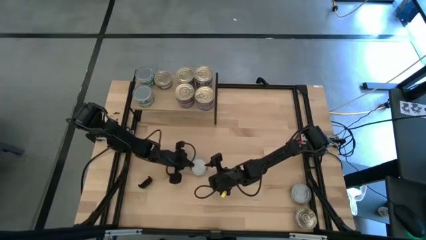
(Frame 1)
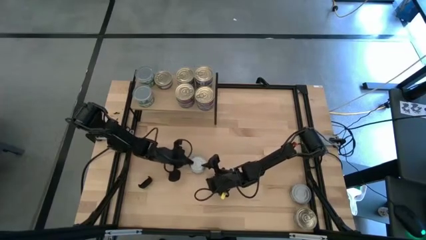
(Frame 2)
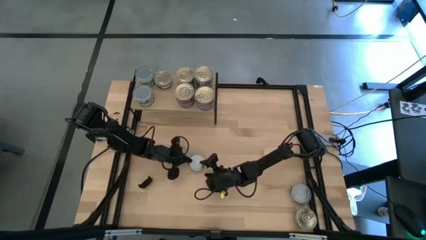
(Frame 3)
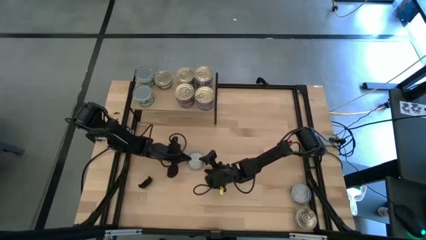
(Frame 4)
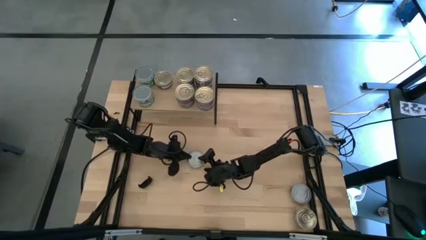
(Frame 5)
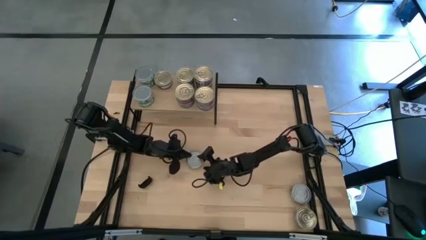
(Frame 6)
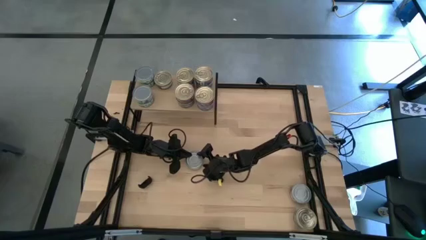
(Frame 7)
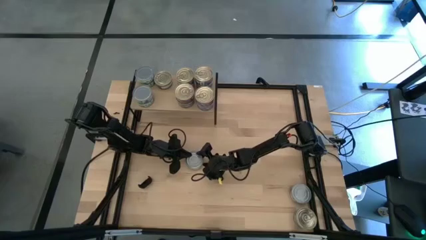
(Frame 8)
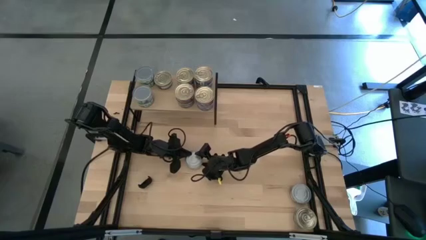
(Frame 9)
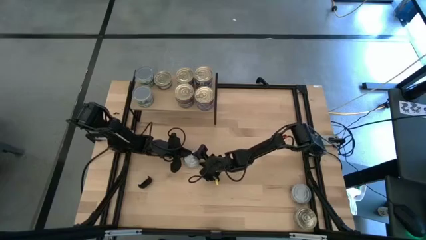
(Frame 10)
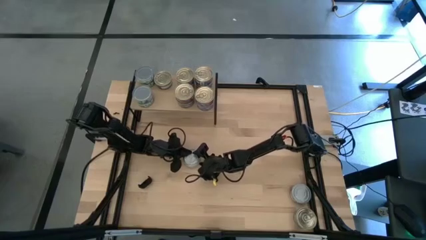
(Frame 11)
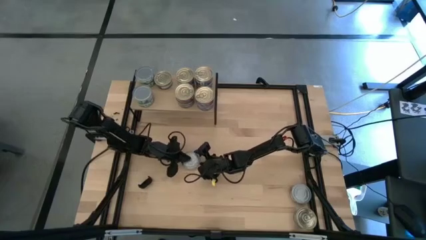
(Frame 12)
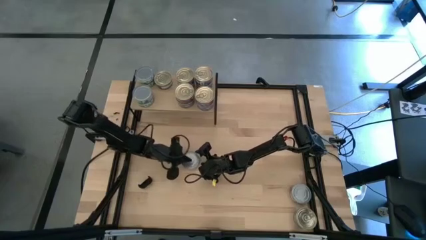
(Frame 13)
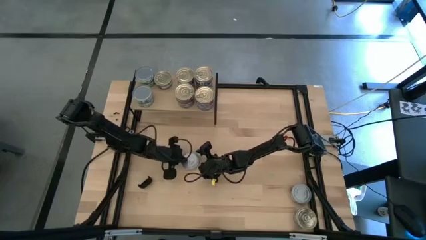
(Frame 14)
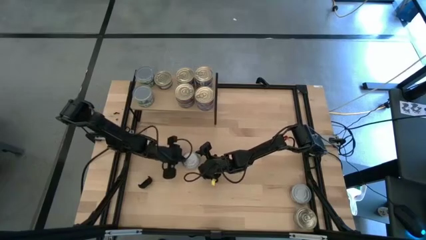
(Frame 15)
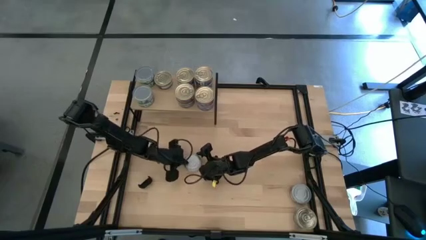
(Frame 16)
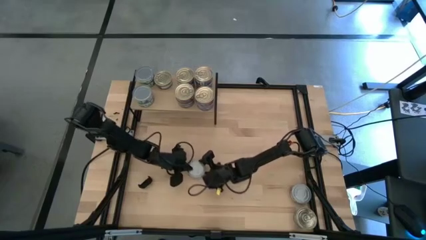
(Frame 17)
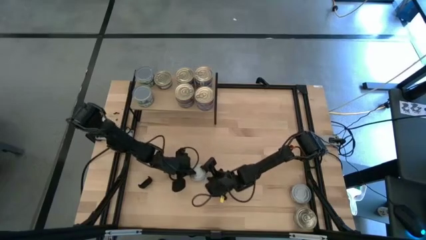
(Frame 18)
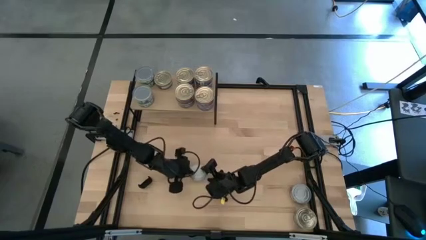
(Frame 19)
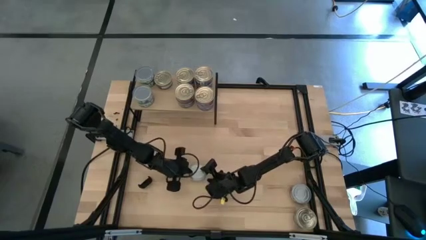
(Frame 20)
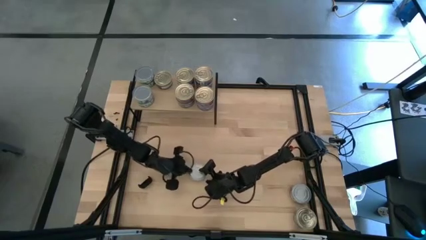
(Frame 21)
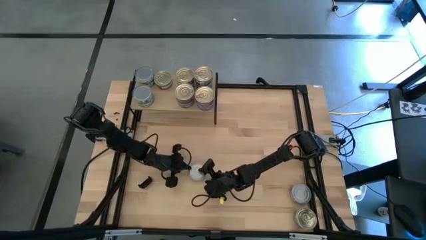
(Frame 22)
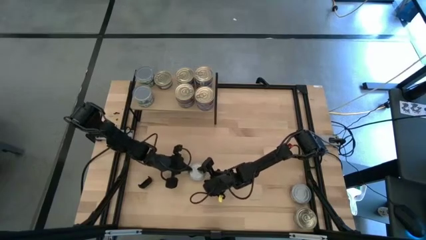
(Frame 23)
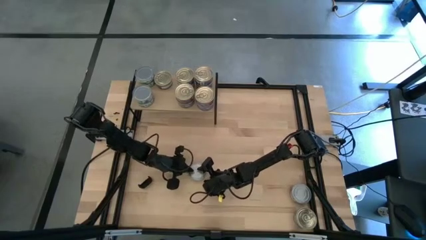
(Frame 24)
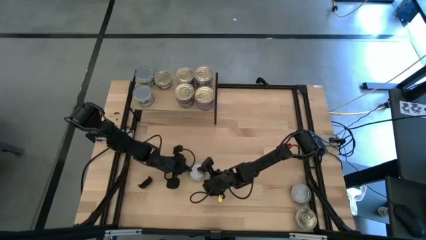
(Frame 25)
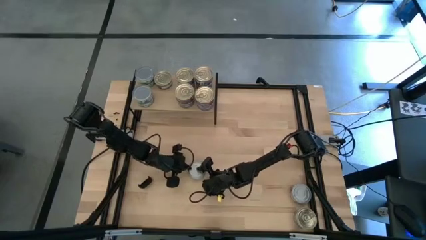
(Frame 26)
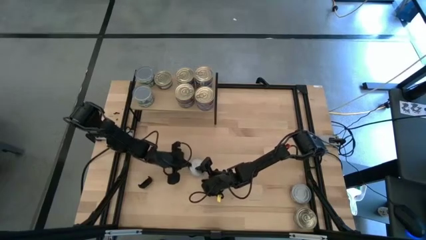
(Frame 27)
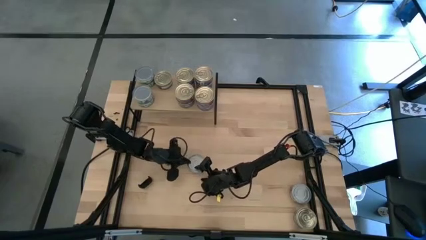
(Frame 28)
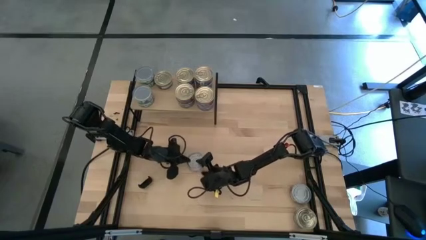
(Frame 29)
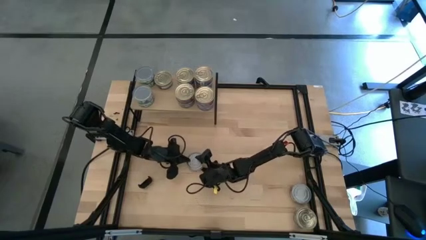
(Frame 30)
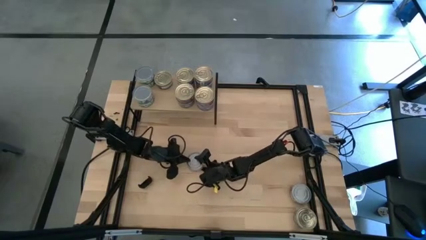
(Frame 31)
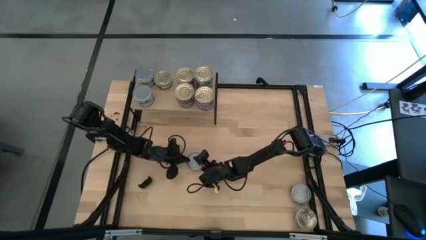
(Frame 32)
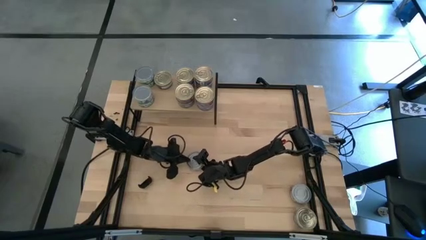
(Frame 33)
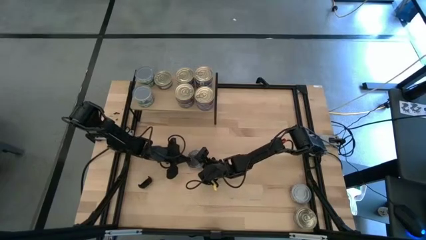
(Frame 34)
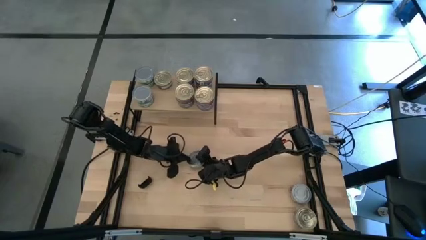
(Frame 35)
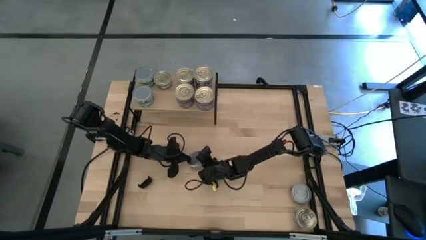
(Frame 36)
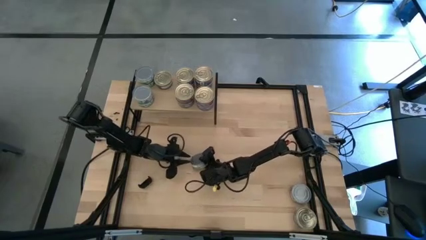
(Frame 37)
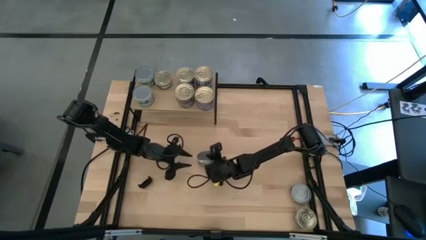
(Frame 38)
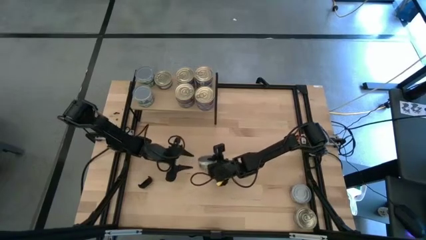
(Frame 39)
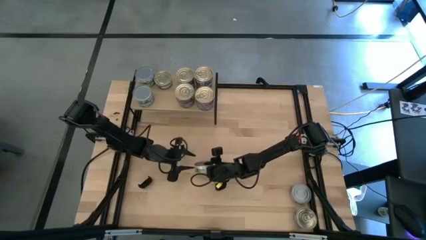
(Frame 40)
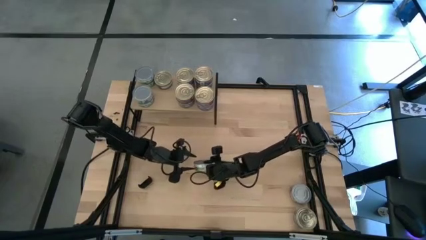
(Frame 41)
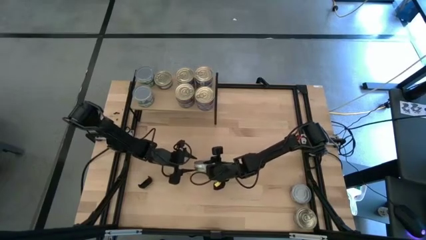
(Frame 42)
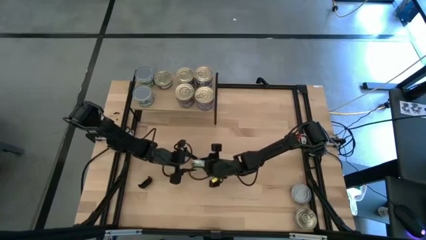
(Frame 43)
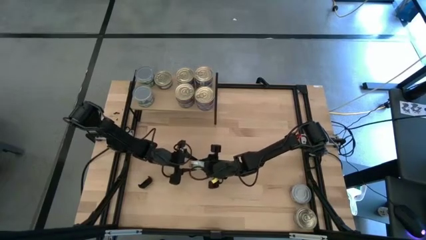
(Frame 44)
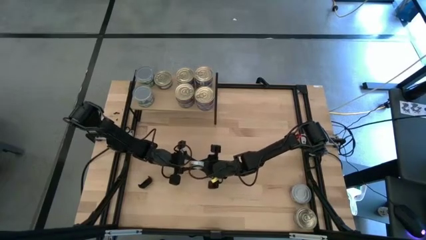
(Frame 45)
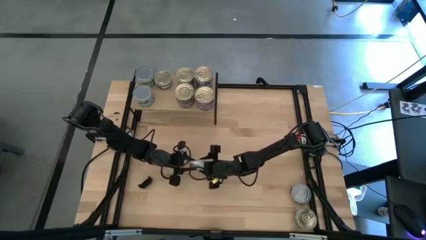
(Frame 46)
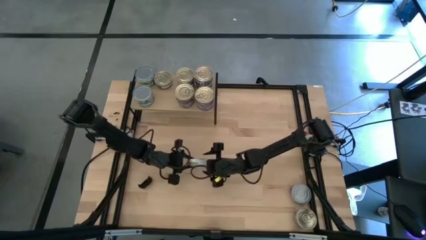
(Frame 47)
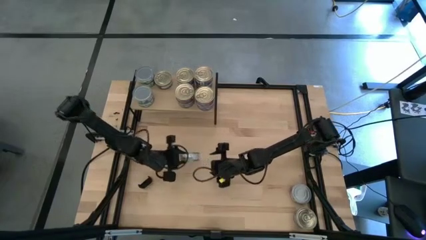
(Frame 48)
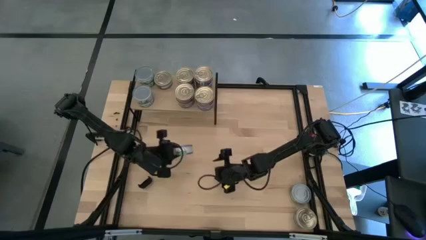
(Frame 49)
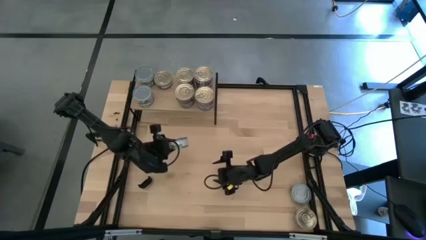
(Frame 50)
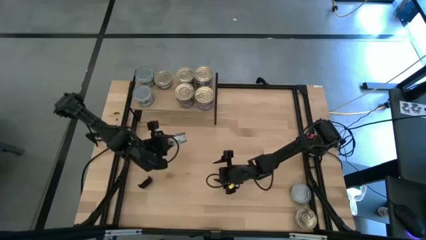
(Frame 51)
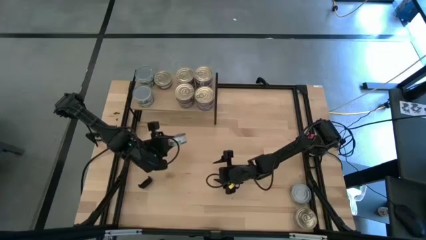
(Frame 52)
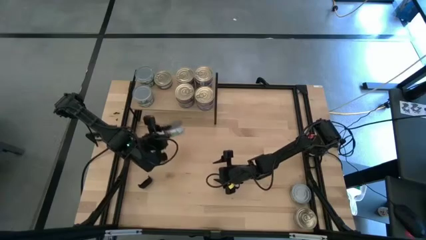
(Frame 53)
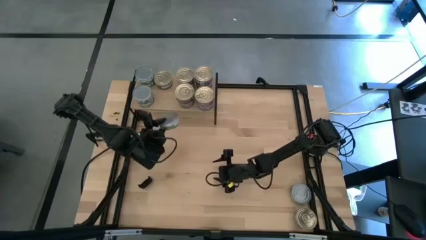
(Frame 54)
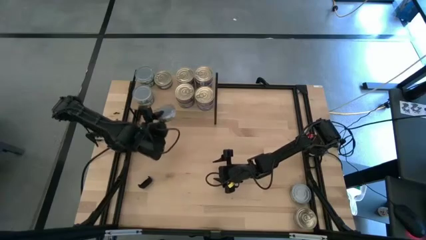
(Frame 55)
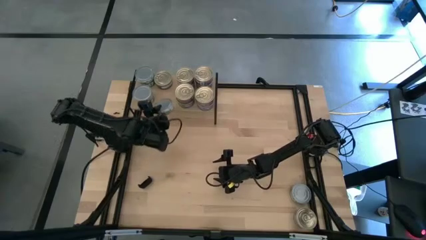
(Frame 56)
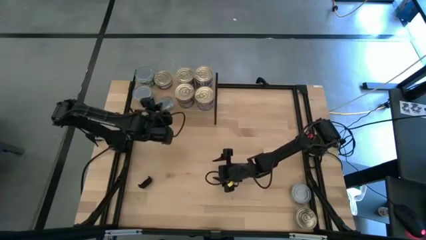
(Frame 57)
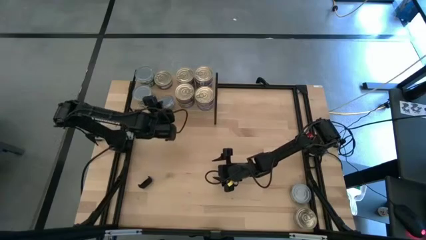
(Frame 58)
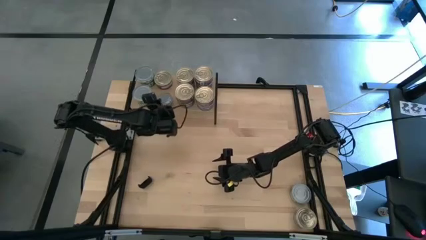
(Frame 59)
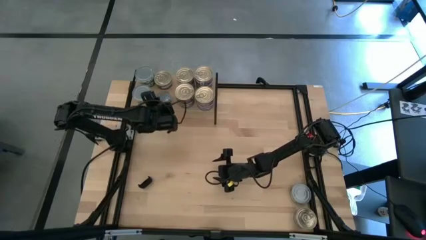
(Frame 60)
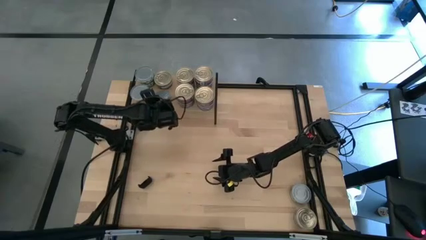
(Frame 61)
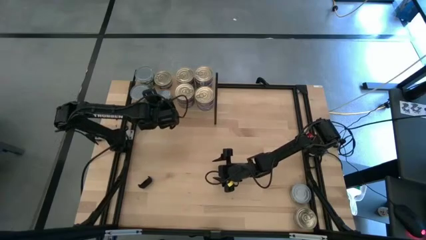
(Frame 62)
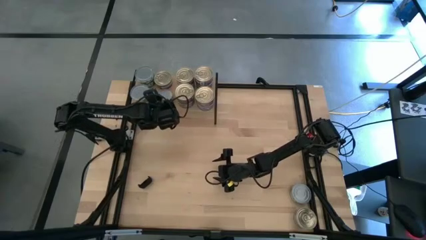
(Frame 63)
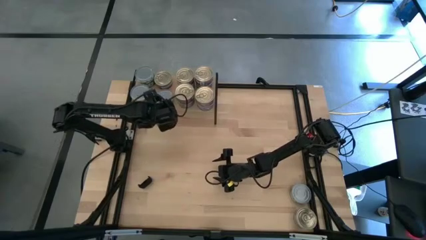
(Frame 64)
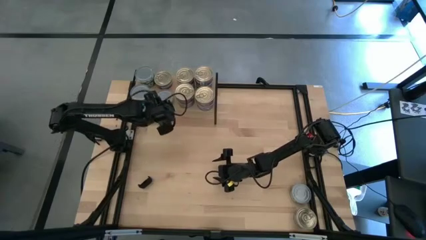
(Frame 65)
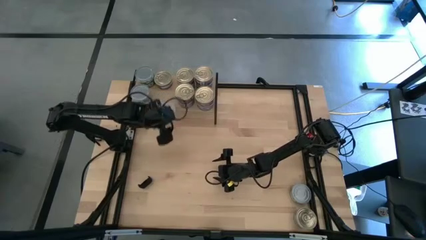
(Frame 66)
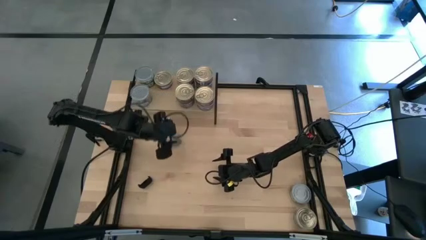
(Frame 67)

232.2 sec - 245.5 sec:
Task: Stack canned seafood by type on shelf
Put the green tuna can on the shelf

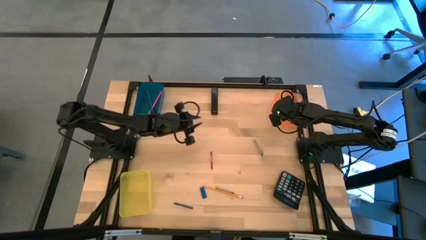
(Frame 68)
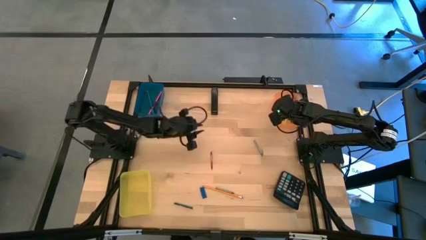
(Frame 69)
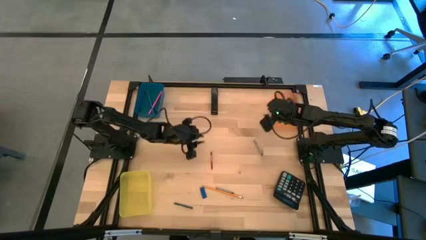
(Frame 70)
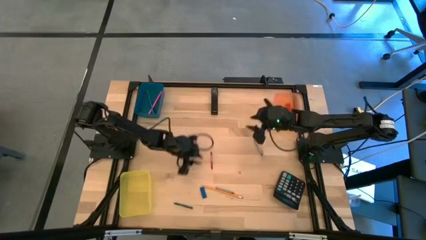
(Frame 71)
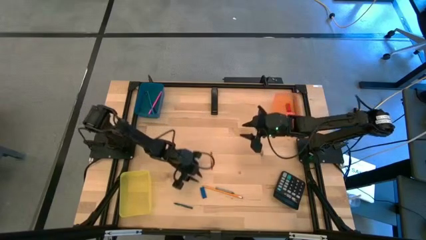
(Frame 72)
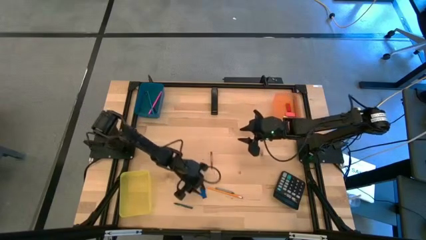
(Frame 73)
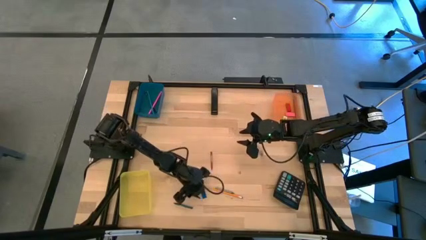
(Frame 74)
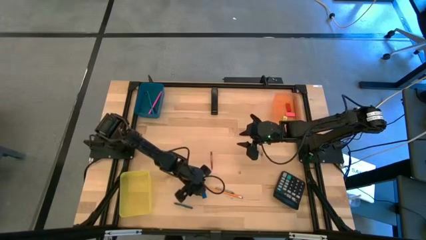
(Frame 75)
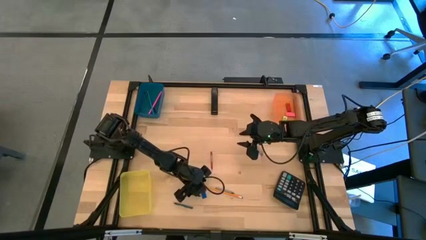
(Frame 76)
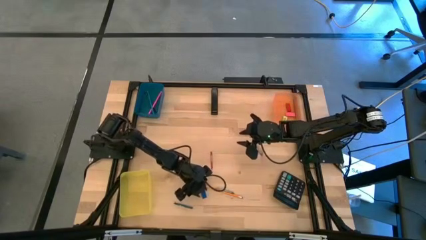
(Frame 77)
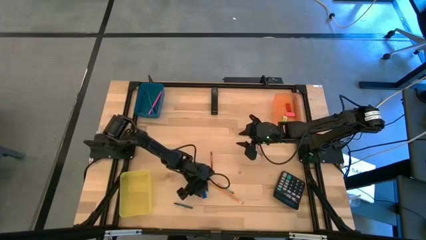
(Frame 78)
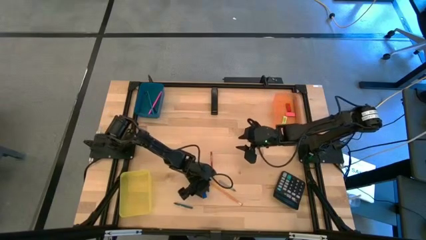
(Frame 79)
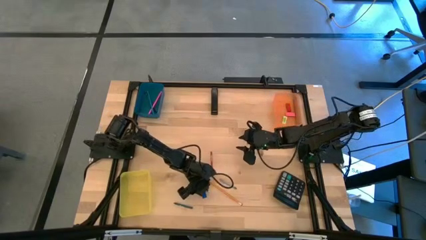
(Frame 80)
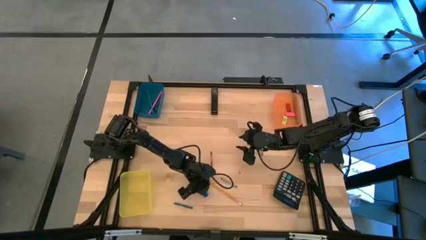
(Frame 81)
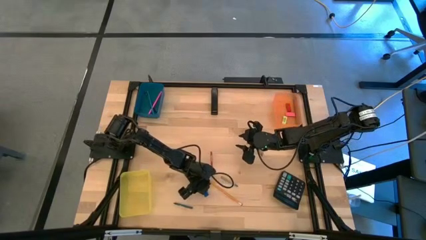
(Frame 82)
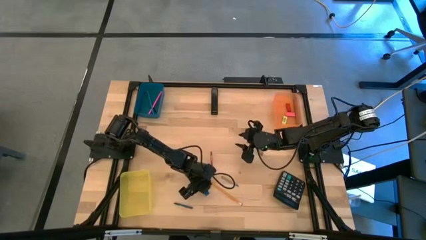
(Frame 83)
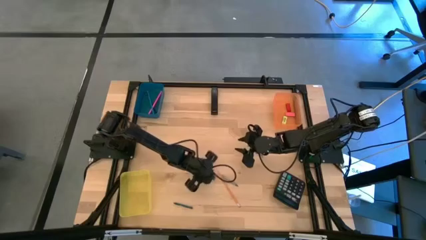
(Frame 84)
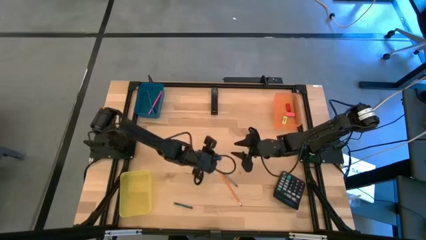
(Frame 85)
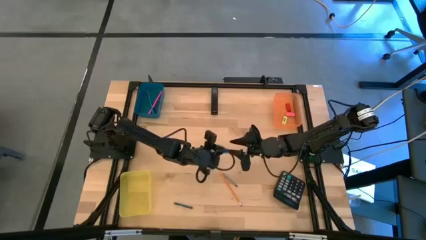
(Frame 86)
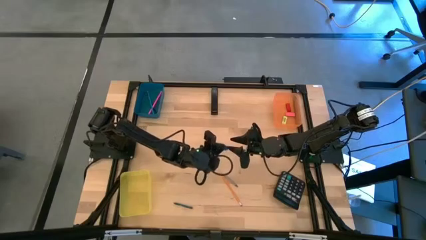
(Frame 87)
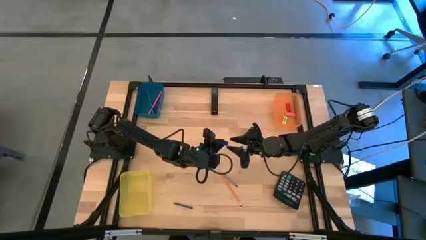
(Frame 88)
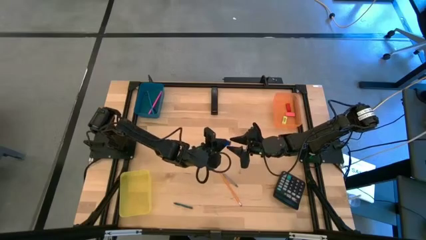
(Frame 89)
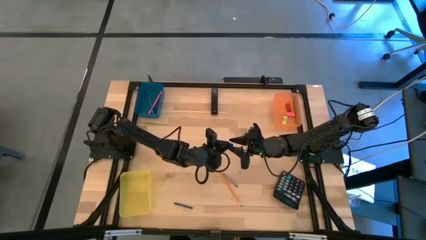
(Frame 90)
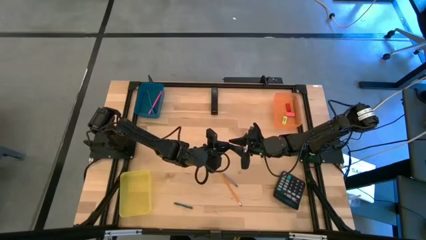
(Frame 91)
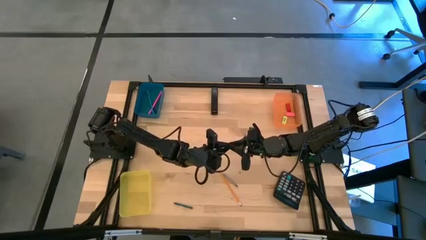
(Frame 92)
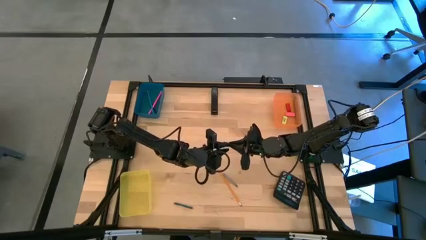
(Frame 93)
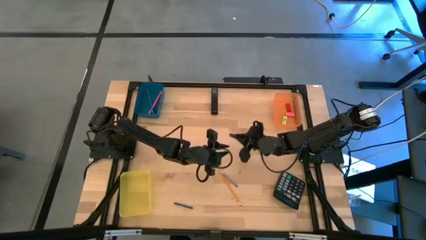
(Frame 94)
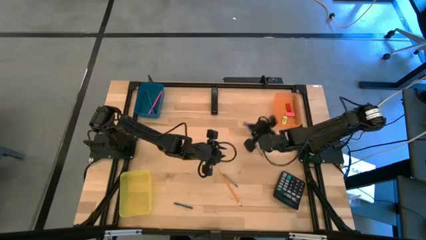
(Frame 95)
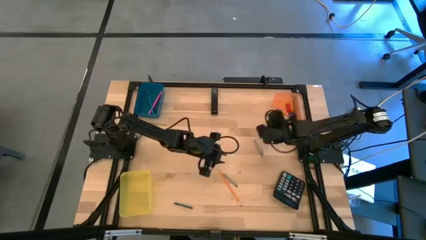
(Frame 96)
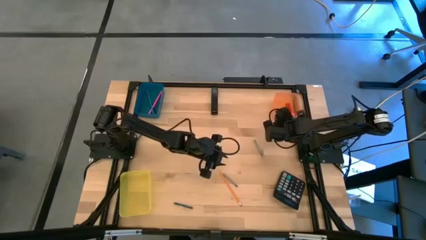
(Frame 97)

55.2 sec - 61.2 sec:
Task: Sort crayons/erasers/pens/pencils in bins
Put the blue eraser into the orange bin
